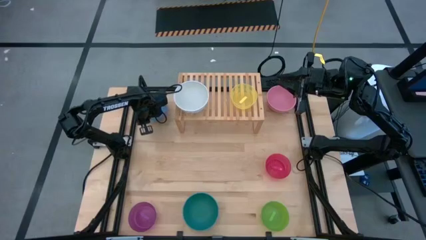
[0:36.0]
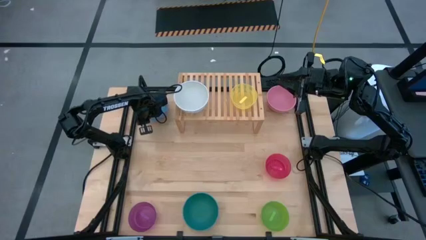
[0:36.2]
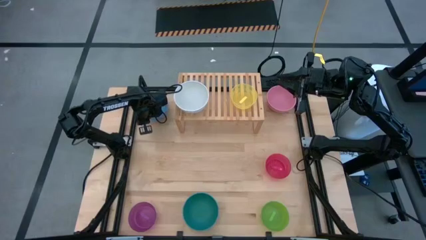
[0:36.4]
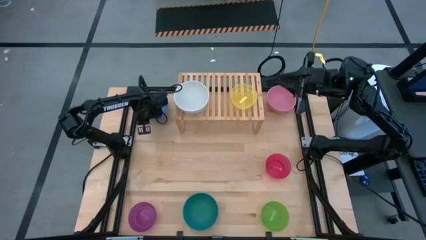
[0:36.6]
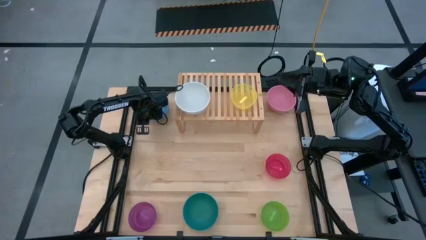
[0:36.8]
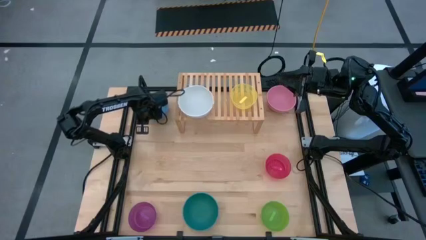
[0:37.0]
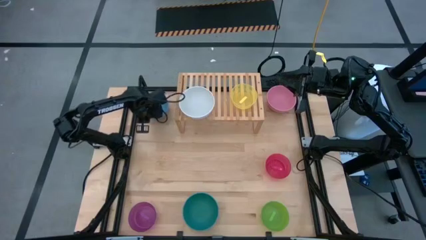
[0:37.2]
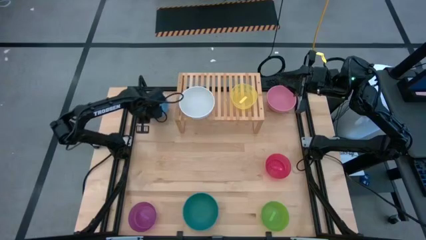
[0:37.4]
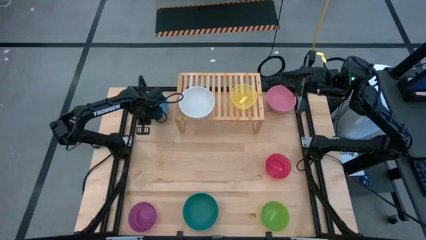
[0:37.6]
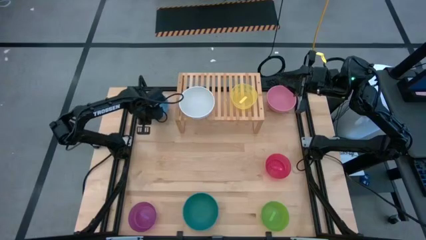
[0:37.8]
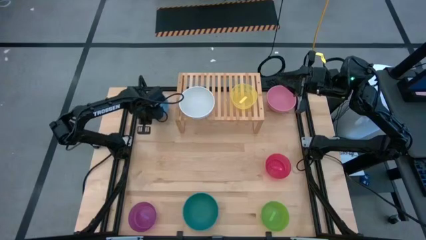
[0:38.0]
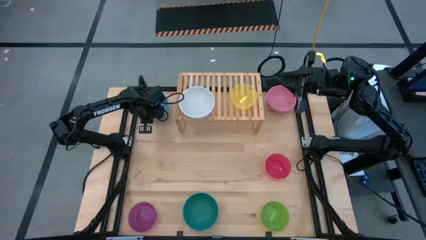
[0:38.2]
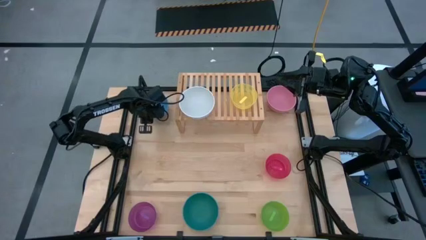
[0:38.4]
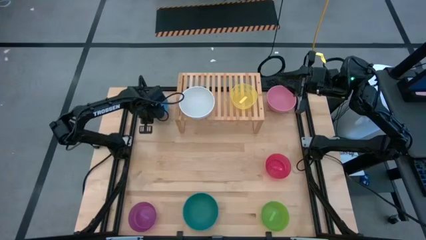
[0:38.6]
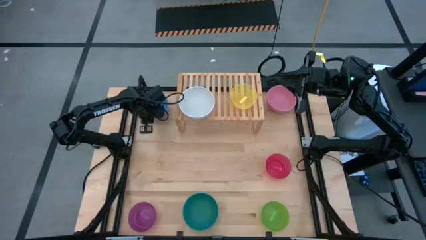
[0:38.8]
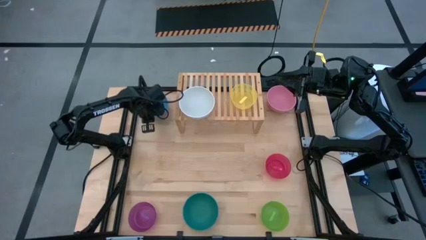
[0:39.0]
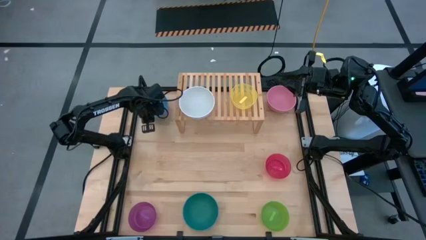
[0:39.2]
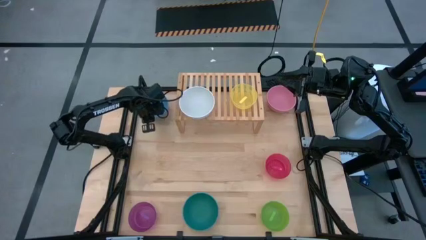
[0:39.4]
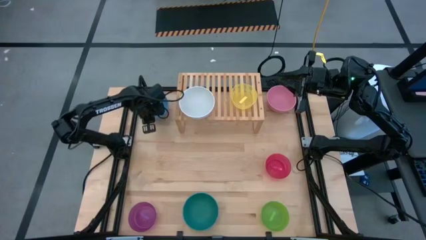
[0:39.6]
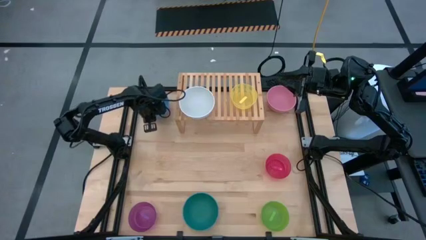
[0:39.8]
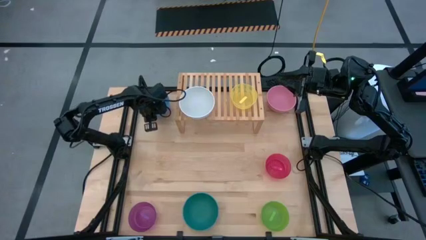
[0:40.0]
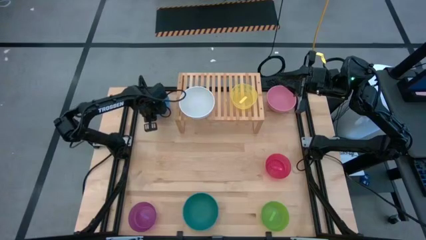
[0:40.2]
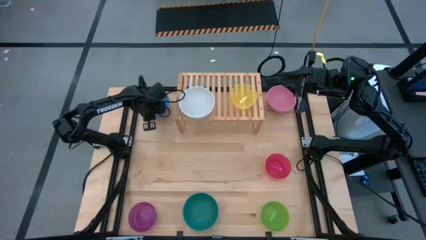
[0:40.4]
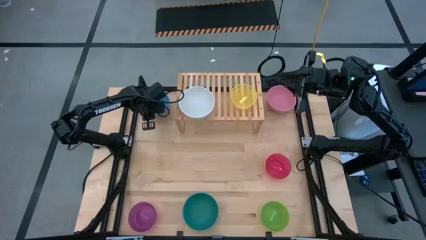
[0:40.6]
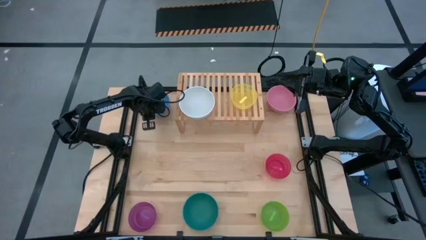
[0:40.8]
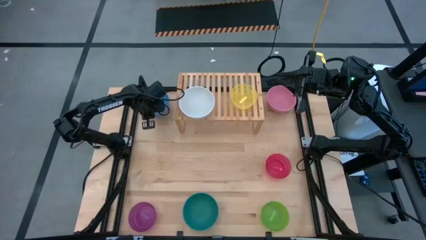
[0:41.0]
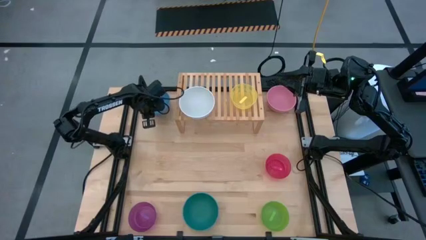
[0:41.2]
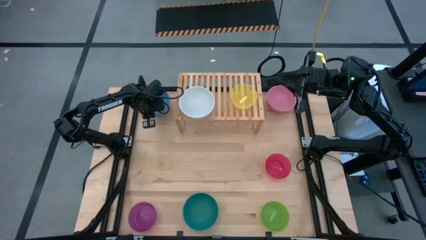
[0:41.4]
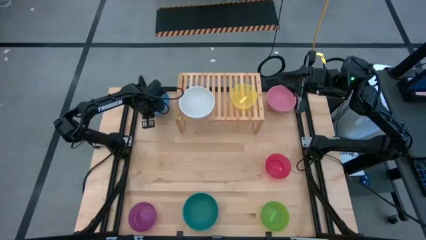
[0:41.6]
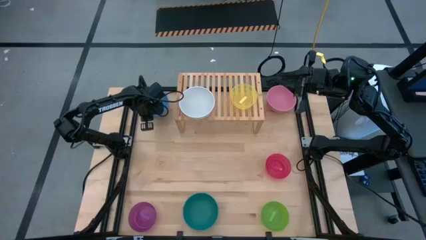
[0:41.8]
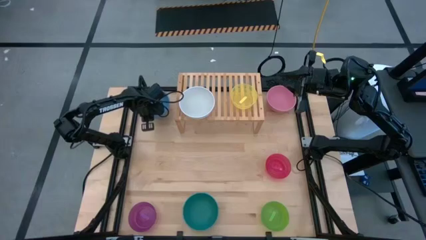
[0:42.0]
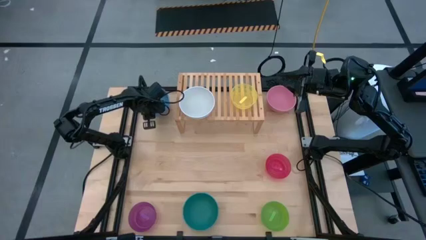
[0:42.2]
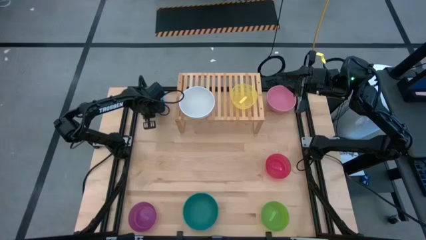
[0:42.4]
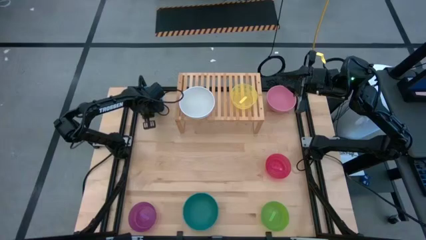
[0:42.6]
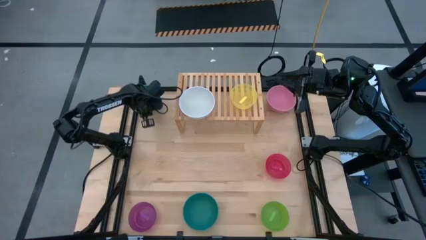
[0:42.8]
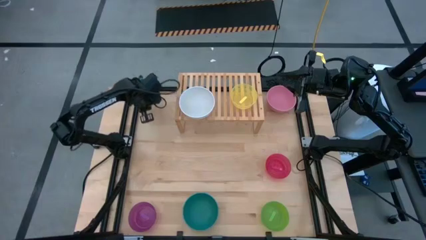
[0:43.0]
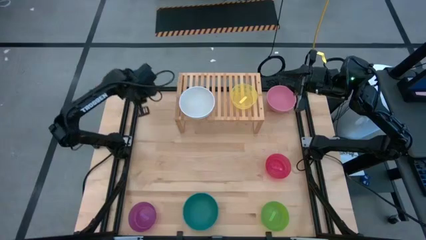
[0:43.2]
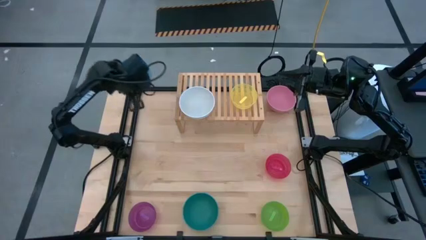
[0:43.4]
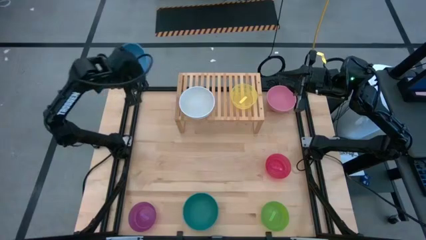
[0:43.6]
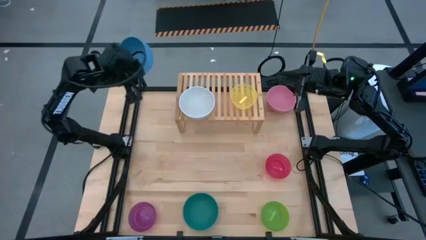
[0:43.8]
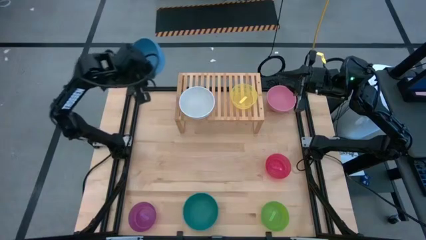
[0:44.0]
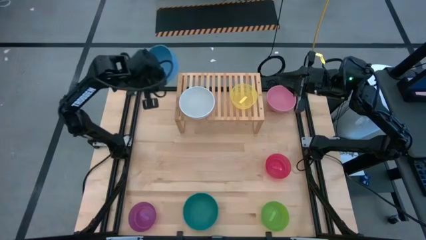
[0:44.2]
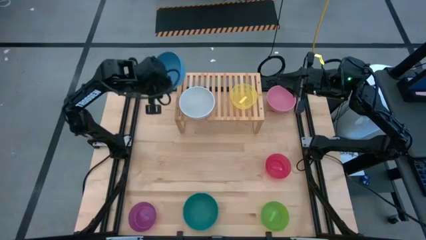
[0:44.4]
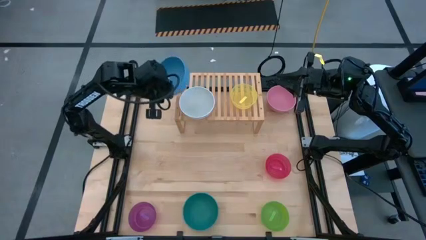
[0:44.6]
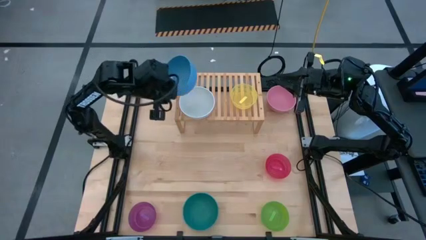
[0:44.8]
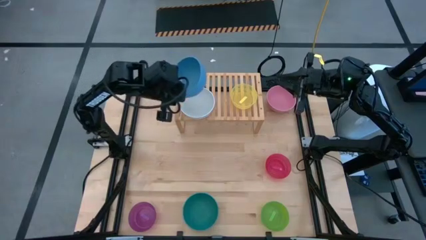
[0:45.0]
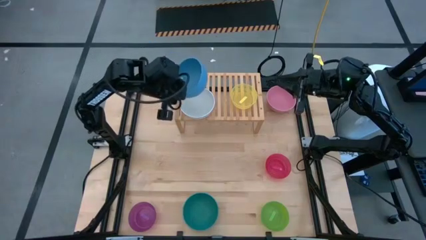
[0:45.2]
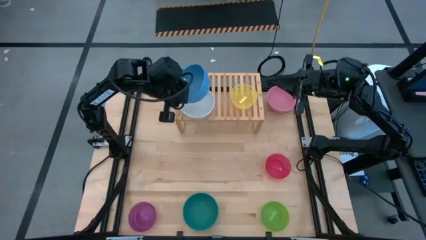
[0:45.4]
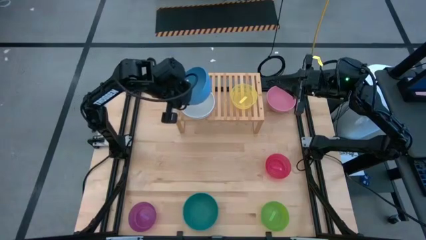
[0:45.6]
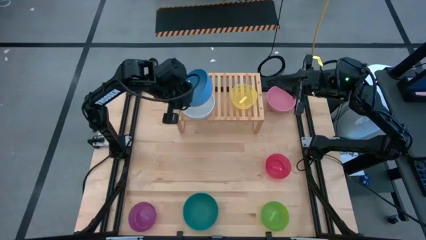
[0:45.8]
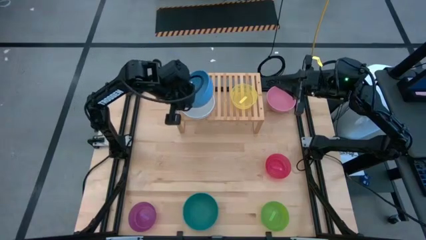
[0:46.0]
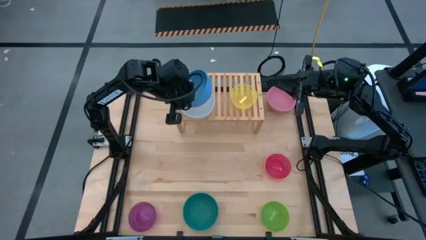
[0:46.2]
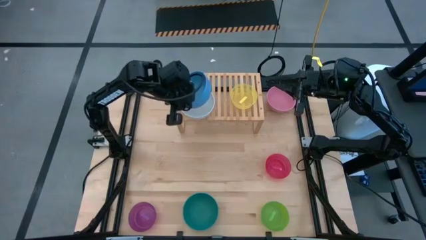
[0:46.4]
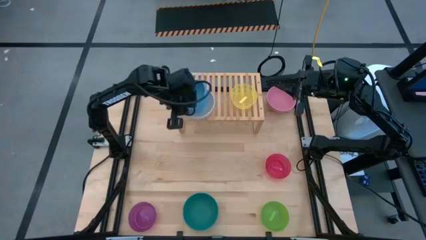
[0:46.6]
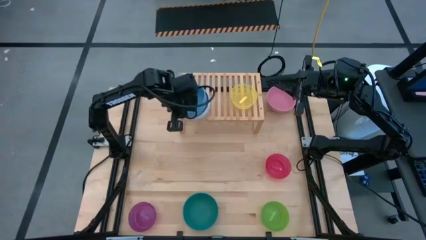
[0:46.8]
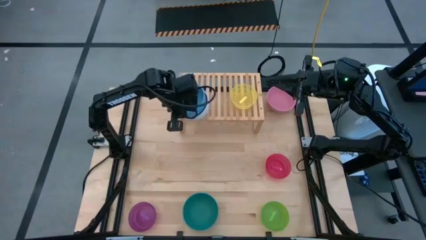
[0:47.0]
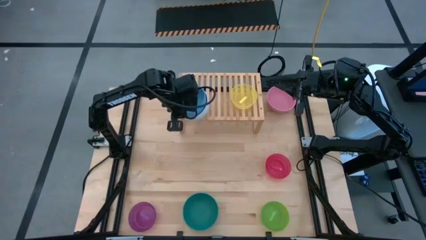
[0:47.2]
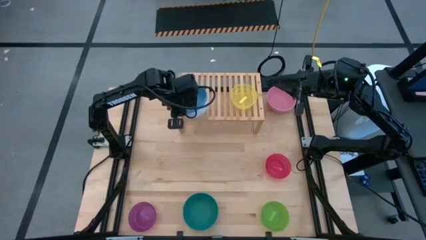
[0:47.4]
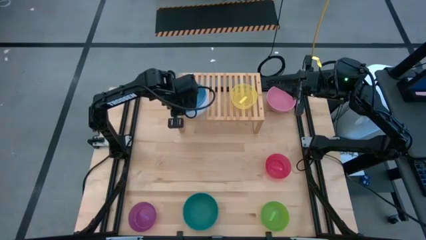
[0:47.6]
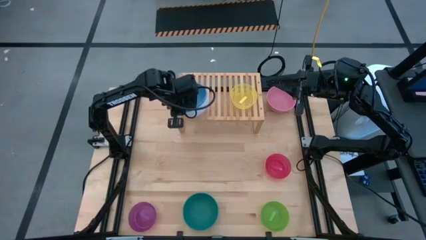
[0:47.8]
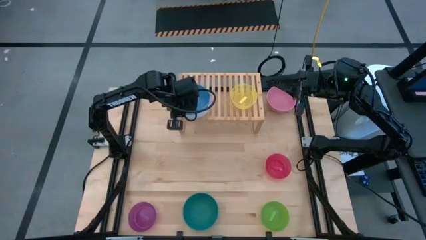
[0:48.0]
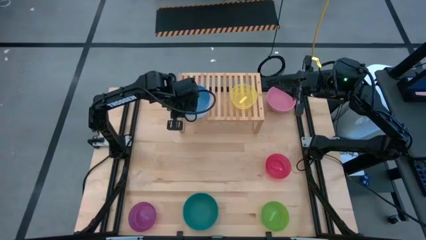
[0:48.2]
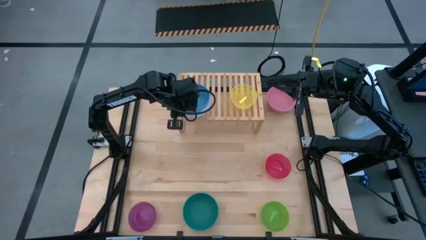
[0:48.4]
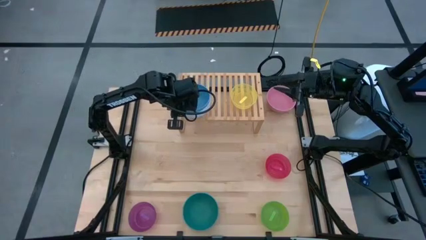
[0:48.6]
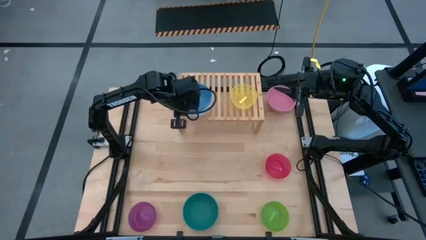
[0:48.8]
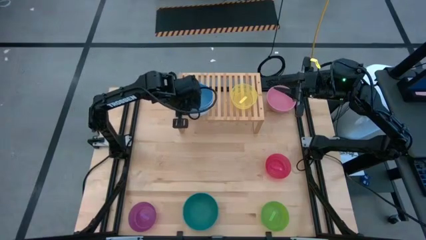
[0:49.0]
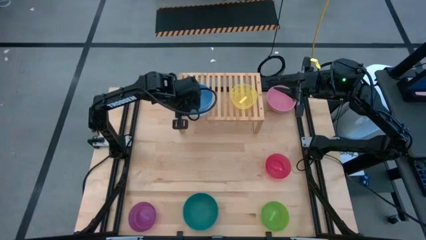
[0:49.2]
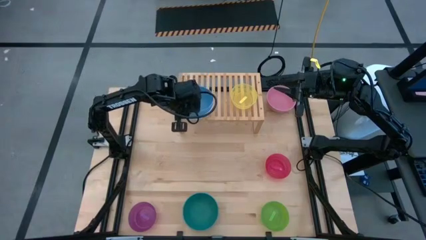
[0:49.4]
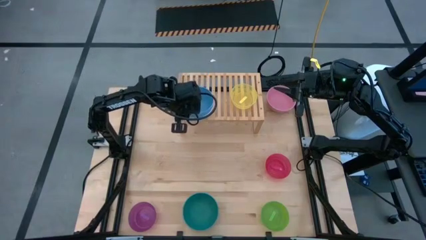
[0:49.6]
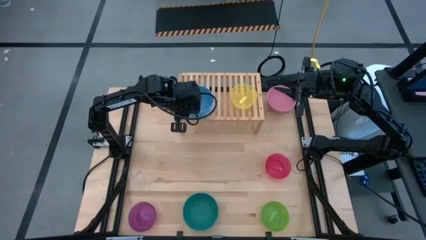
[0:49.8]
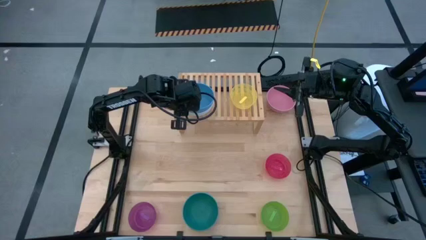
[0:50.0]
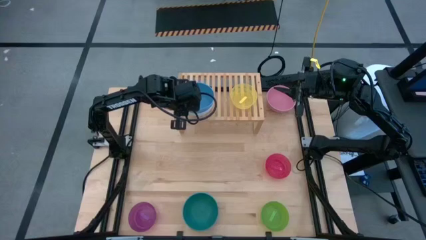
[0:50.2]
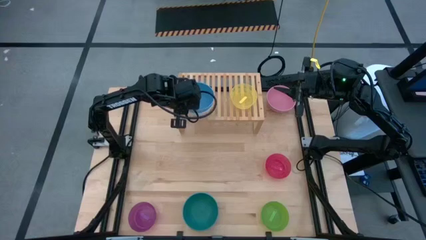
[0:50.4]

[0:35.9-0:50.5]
Task: Place and stack bowls onto a shelf
Stack the blue bowl on top of the white bowl on the shelf

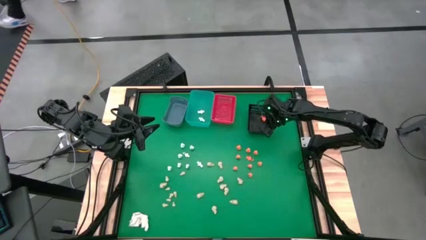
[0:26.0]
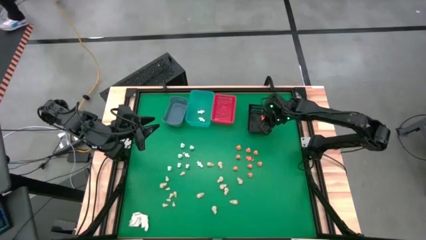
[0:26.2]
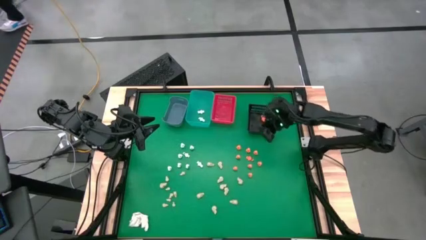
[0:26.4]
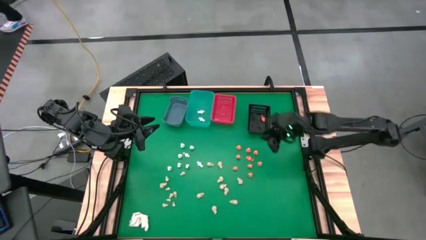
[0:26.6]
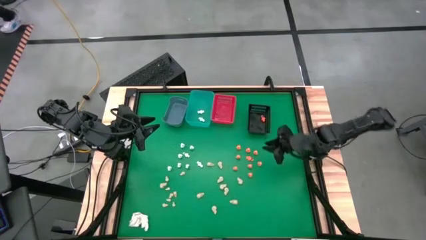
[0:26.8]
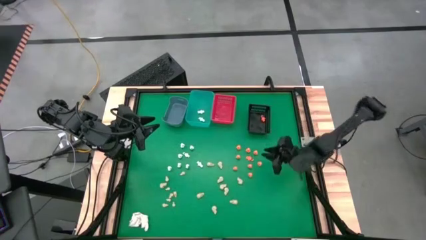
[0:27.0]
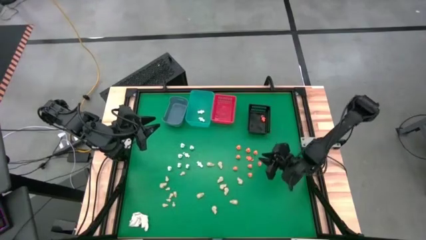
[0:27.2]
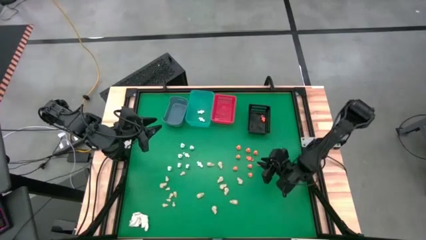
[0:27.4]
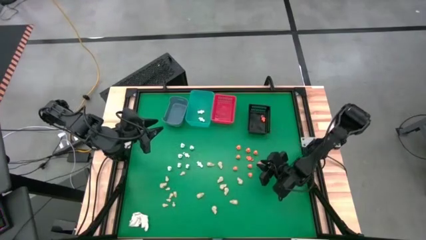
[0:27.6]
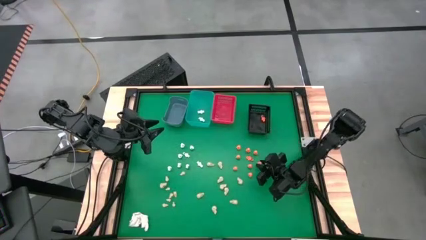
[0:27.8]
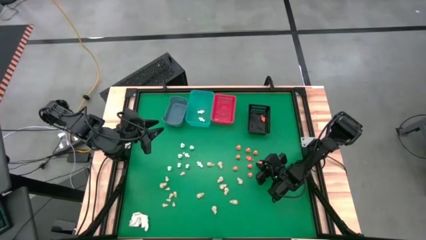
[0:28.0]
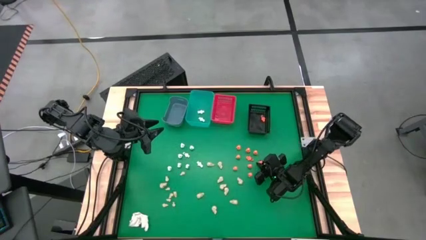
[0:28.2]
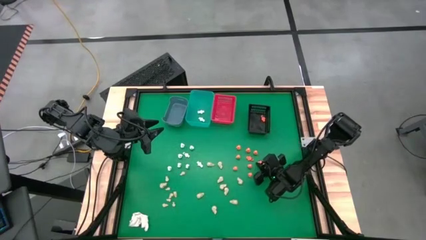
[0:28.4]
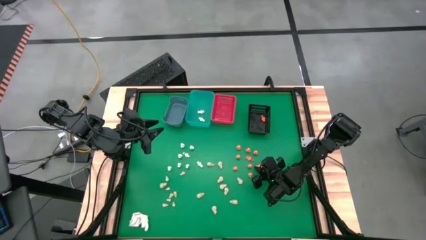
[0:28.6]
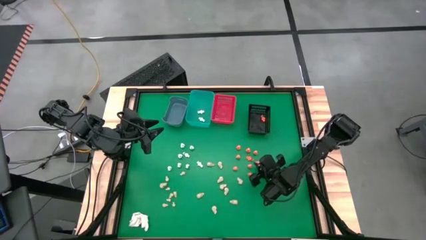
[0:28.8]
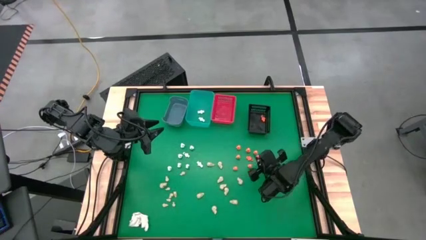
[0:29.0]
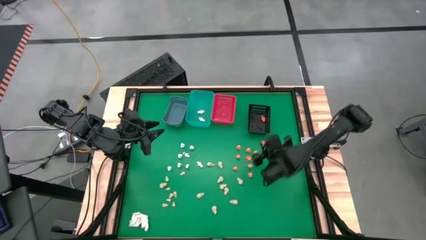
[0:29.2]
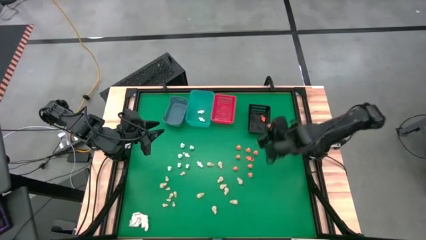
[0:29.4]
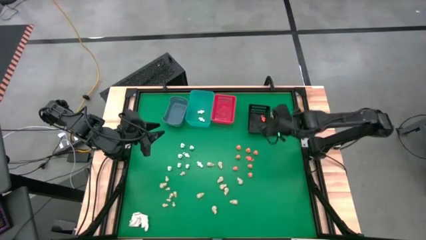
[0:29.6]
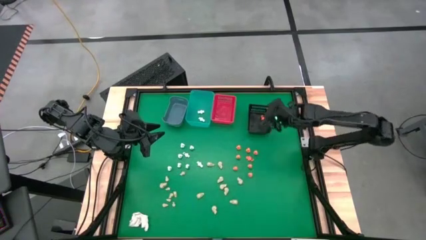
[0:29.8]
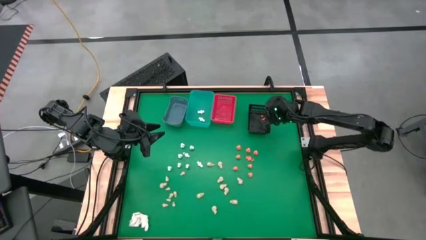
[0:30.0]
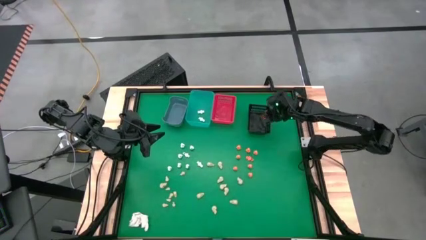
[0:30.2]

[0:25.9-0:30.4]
Task: Sort Halloween decoration
Put the orange skeleton toy into the black bin
